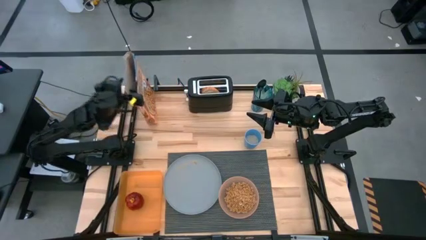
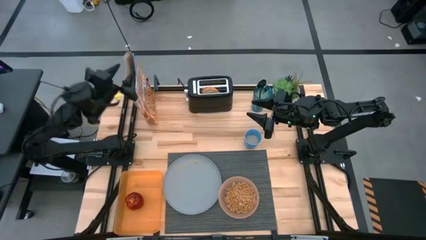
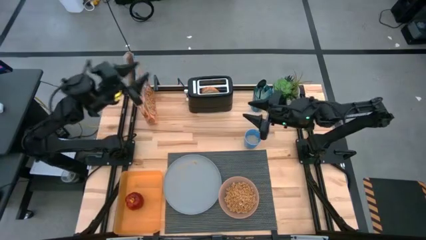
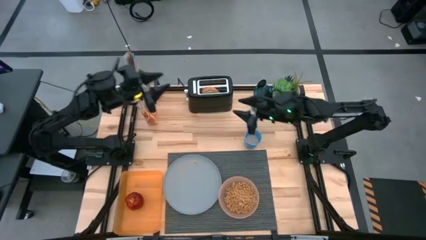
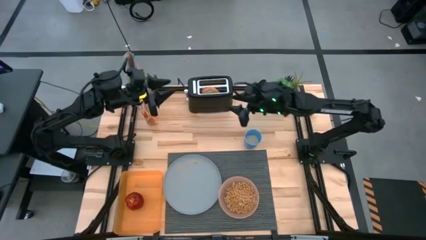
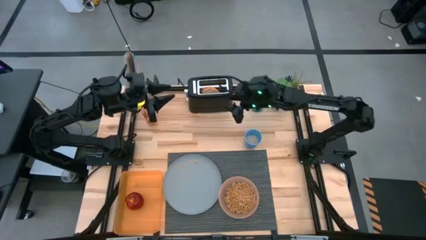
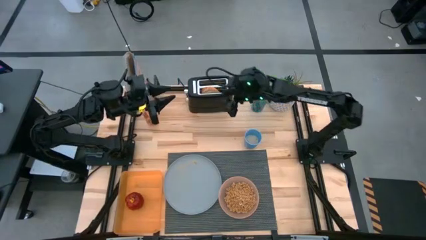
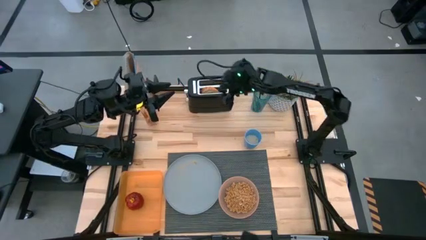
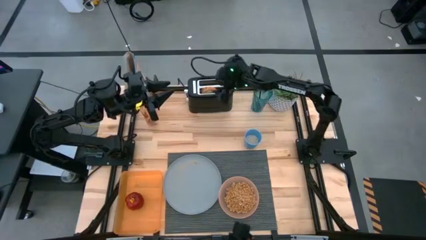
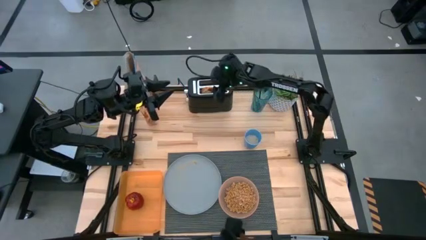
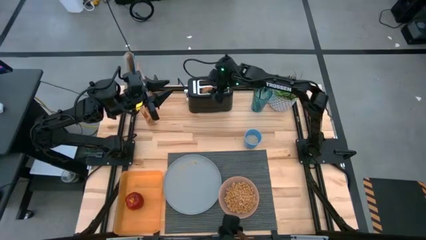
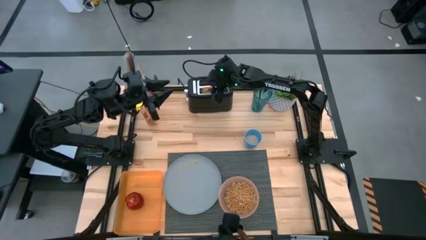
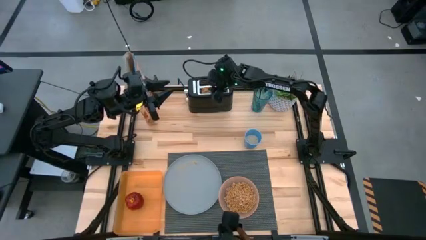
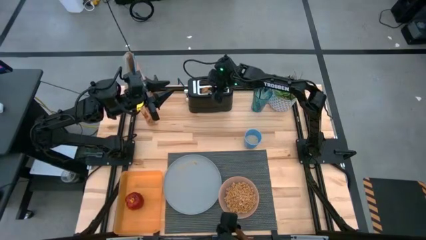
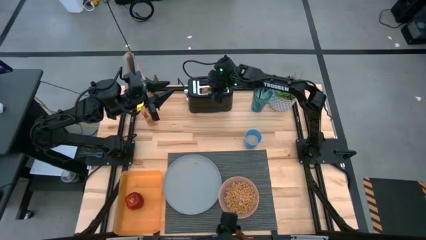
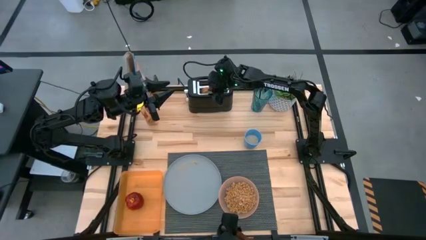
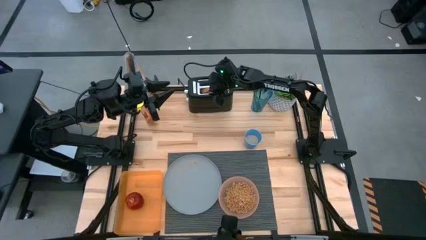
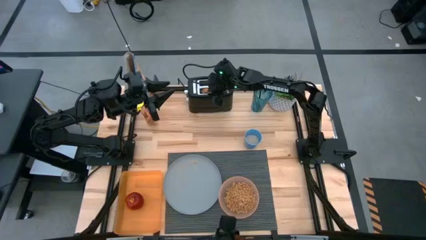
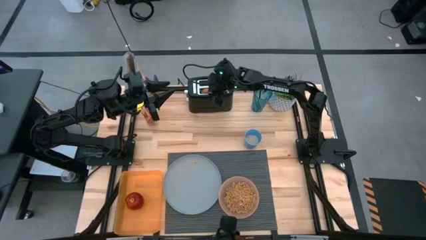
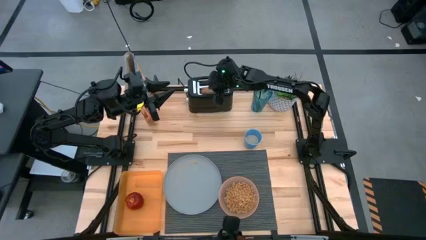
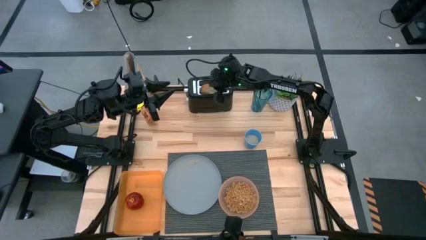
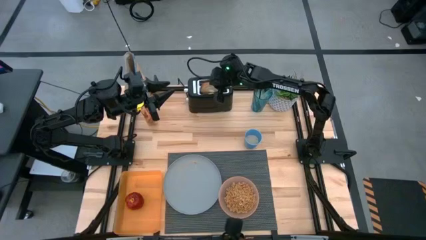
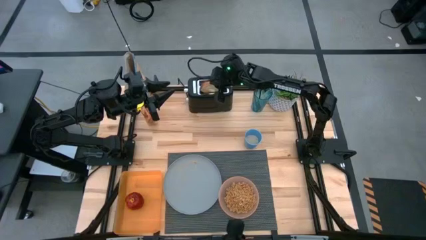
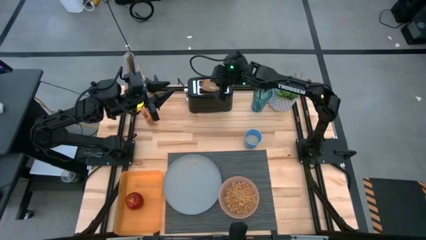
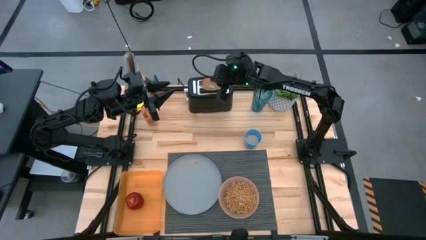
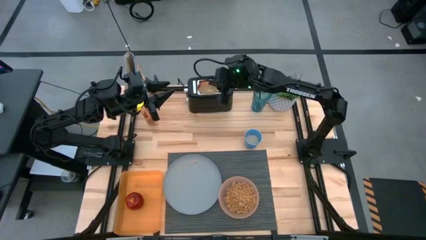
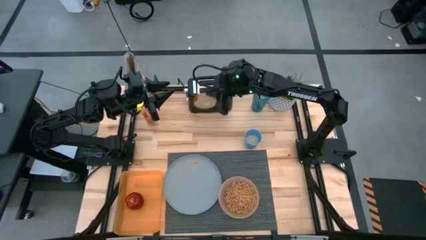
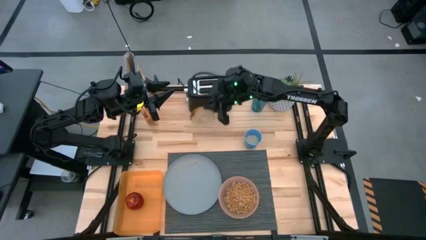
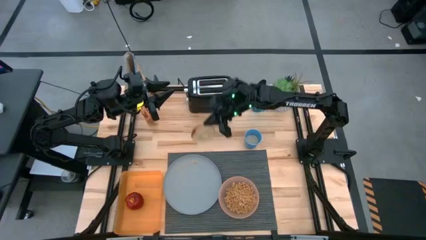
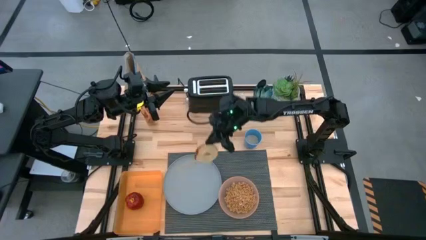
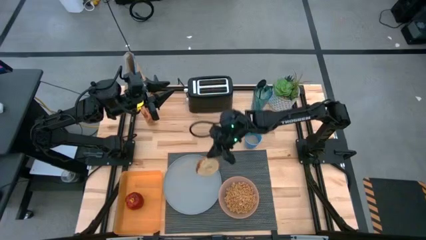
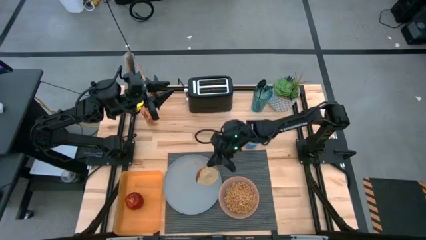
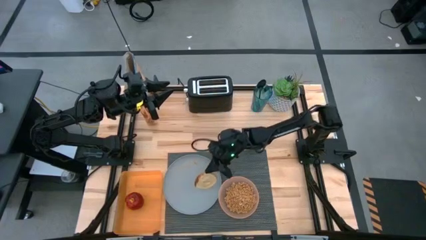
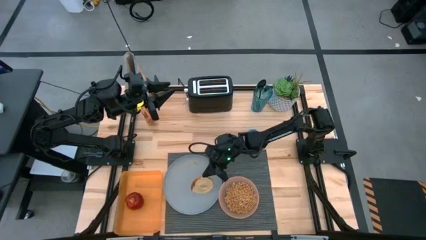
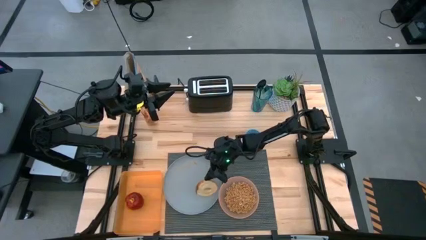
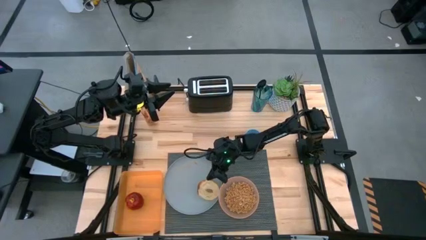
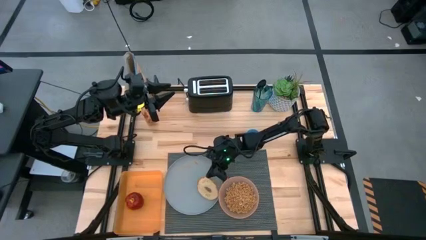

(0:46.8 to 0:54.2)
Task: Arrange a breakfast setting
Put the bagel on the gray plate

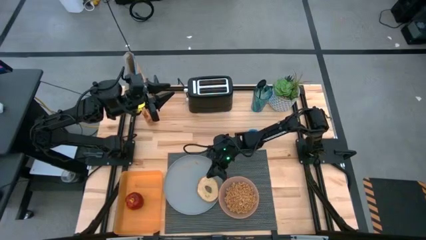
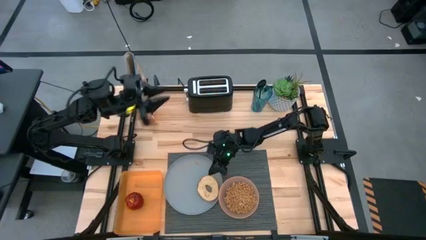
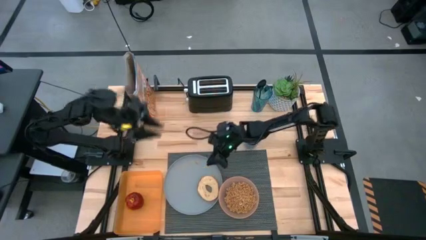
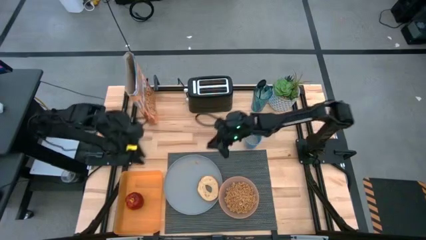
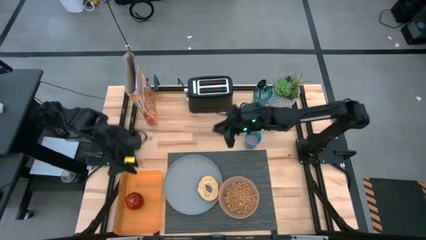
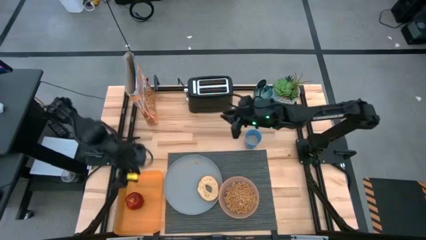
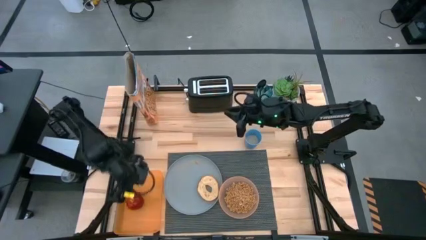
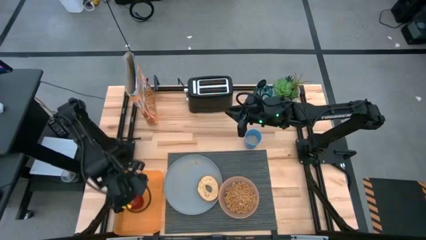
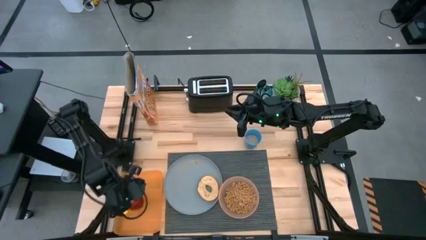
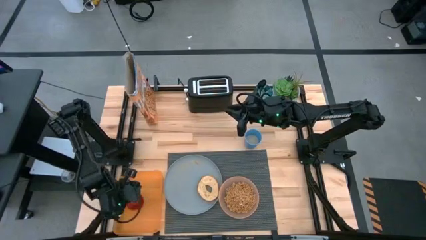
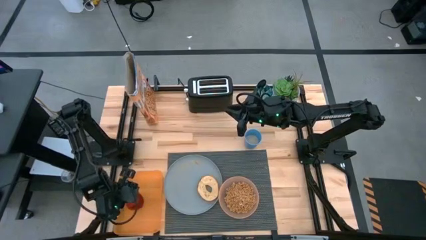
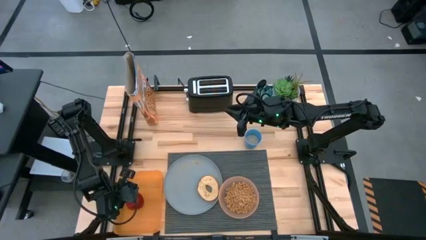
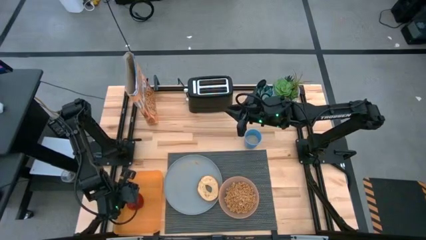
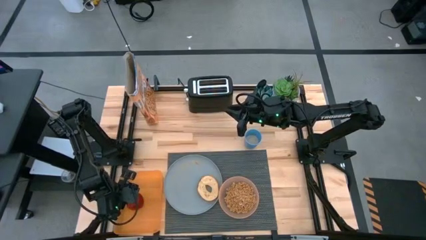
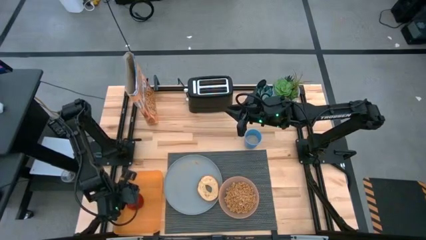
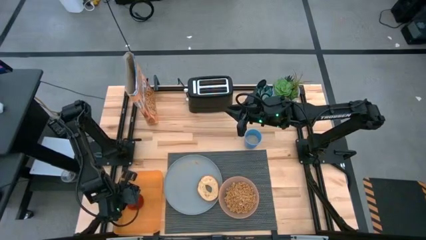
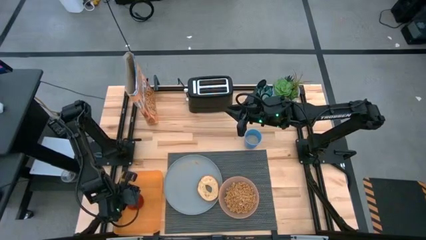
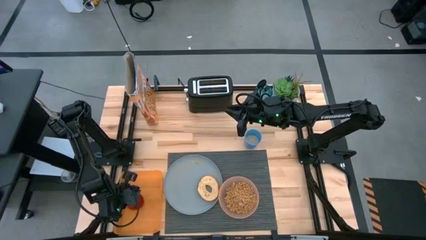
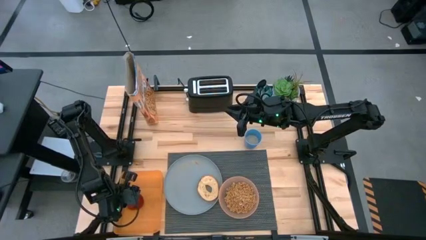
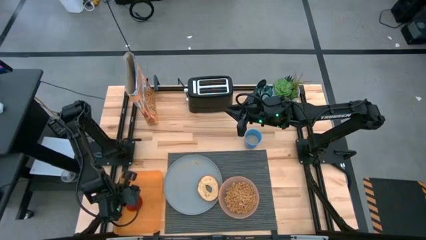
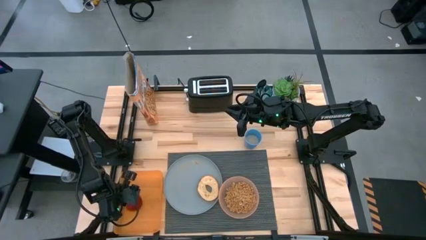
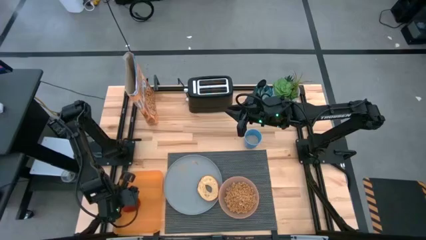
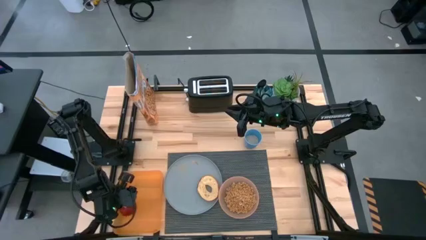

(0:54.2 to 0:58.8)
Put the red apple on the gray plate

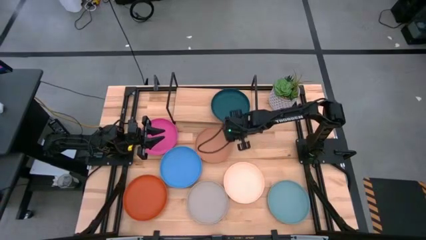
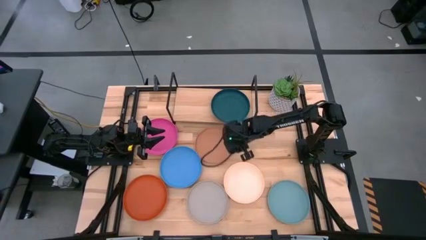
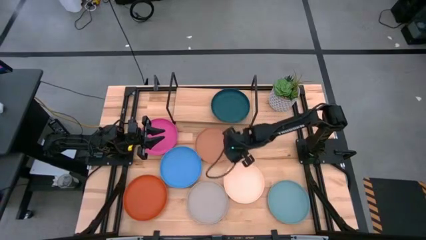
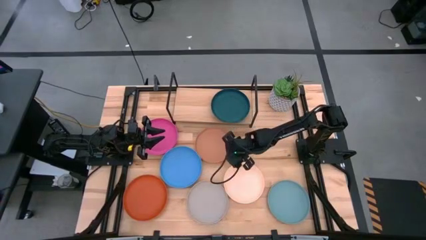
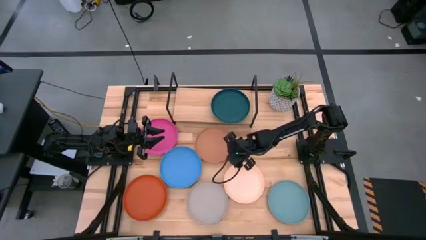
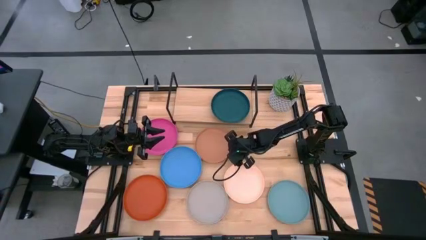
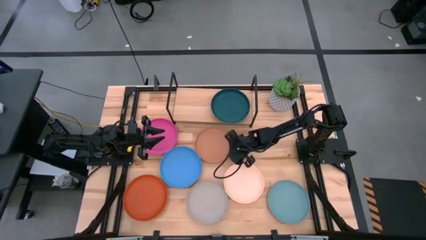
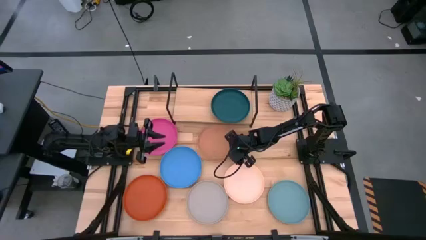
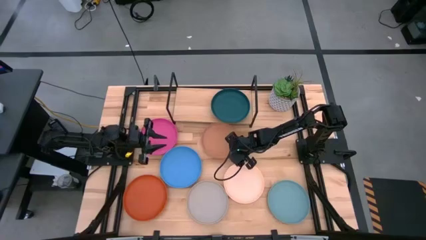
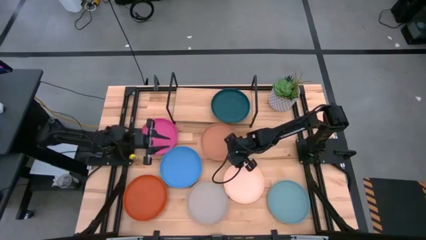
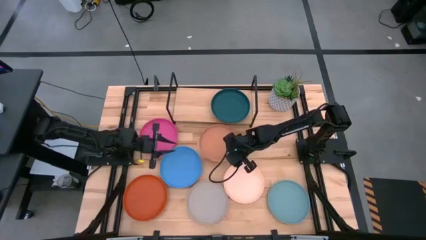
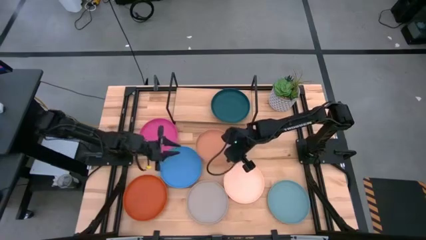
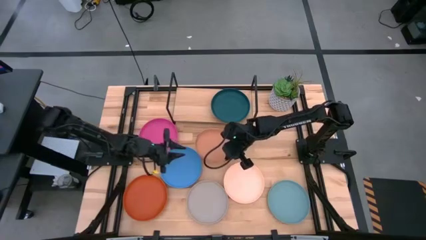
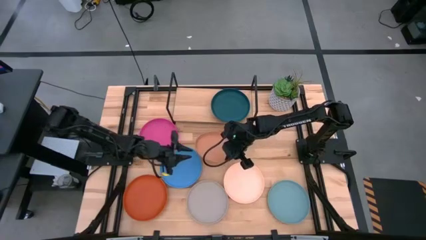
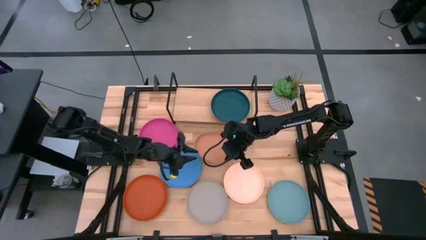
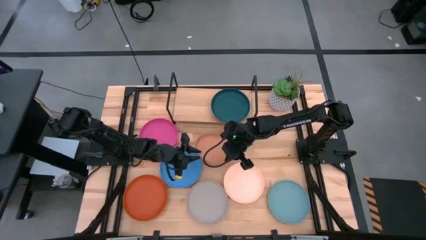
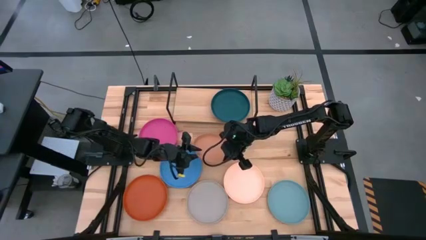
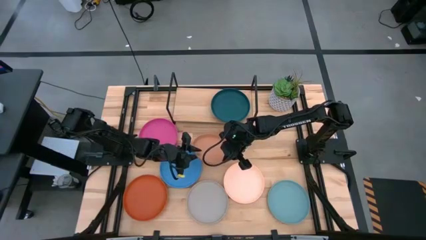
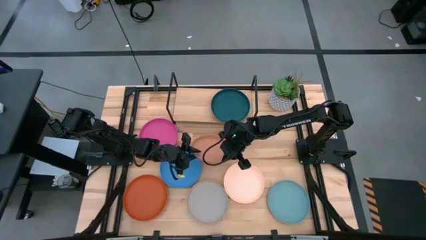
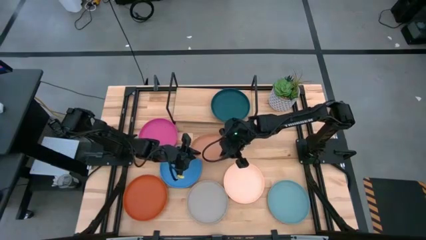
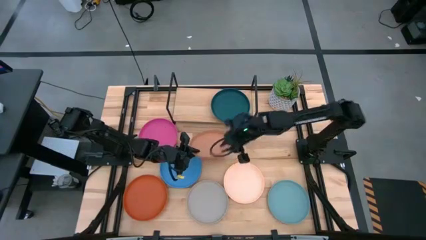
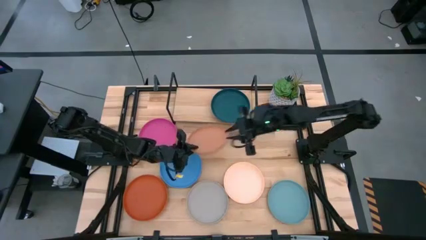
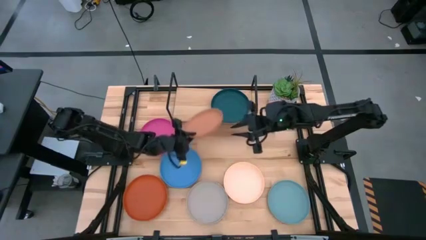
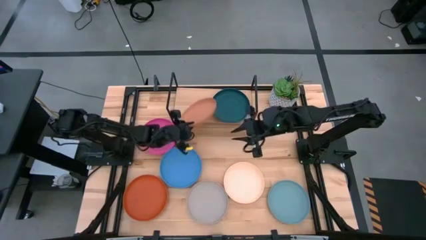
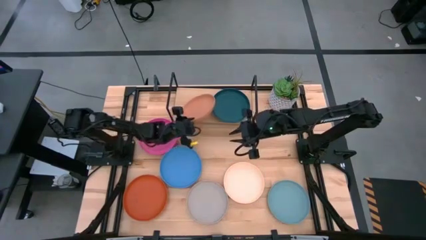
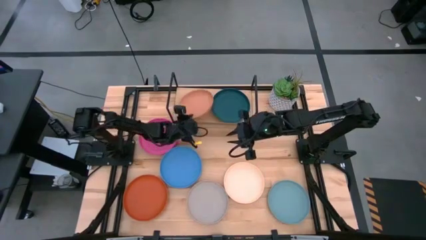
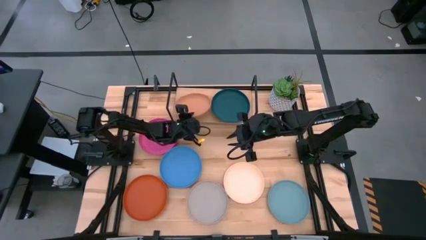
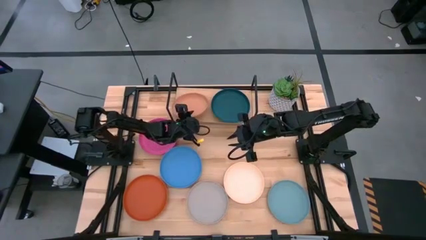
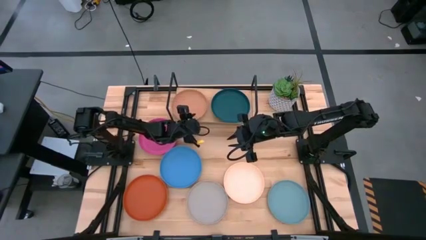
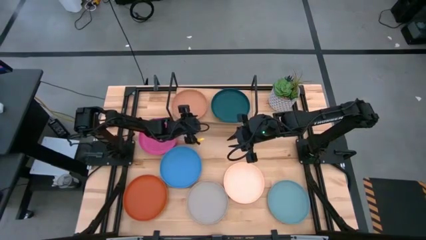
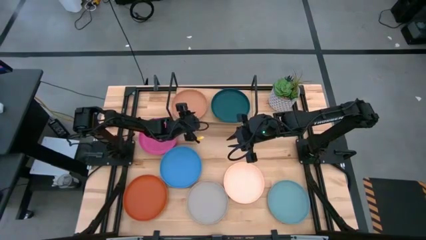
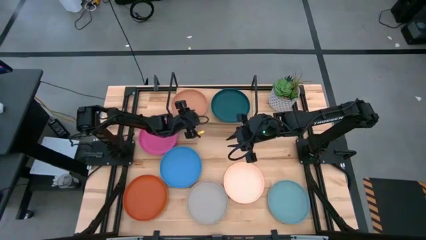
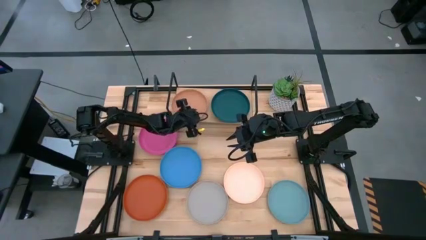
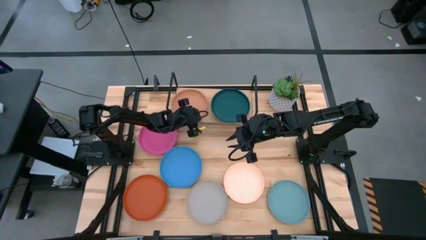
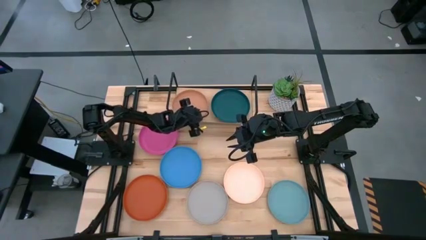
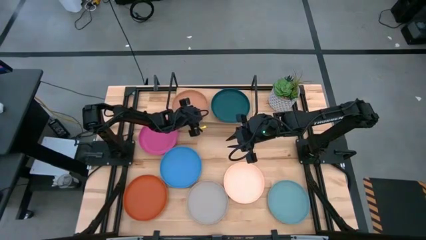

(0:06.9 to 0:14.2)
Task: Place and stack plates onto a shelf
Put the brown plate on the shelf
